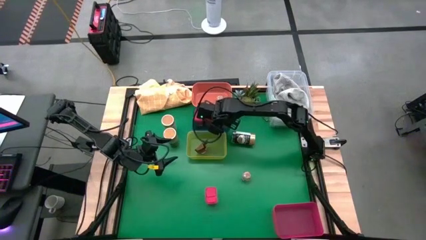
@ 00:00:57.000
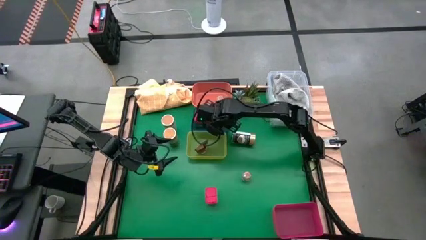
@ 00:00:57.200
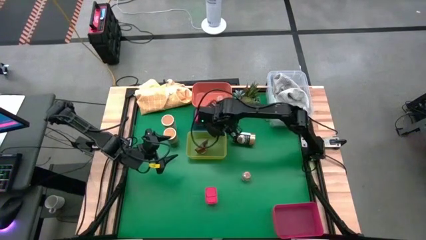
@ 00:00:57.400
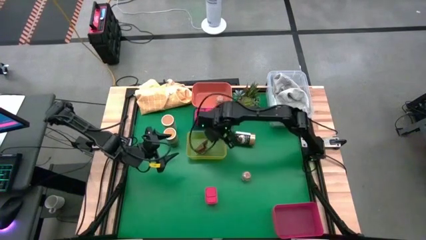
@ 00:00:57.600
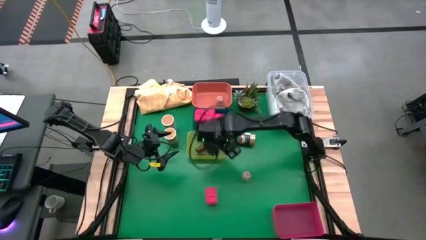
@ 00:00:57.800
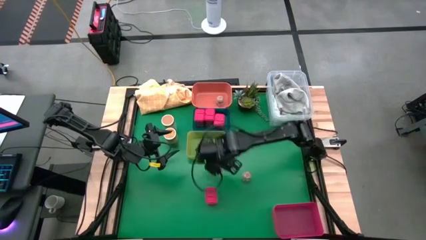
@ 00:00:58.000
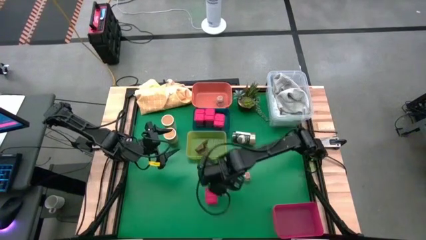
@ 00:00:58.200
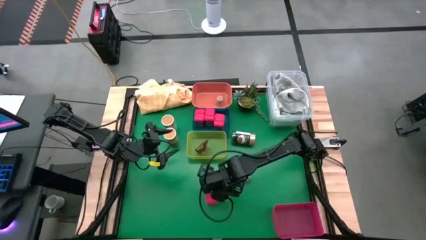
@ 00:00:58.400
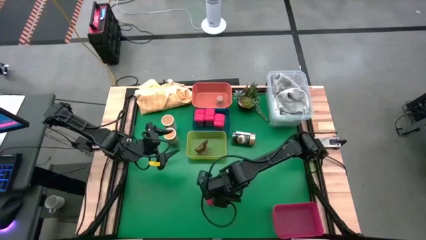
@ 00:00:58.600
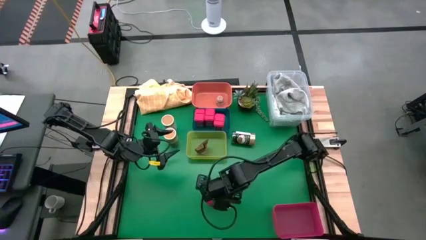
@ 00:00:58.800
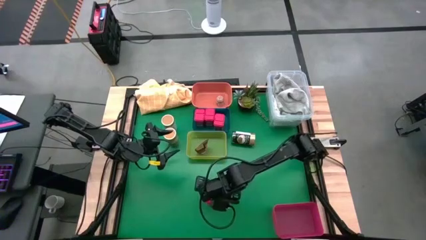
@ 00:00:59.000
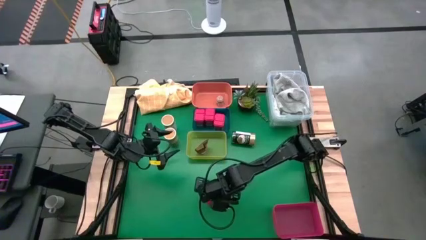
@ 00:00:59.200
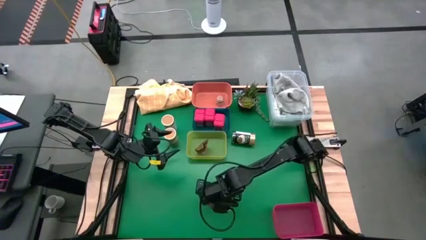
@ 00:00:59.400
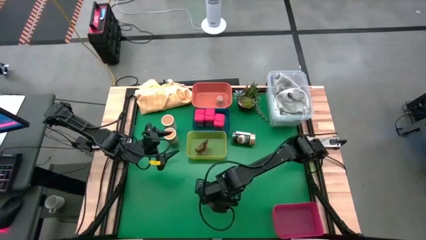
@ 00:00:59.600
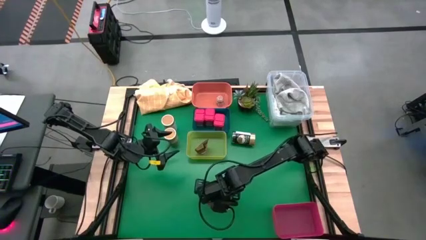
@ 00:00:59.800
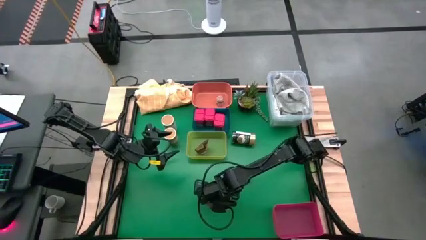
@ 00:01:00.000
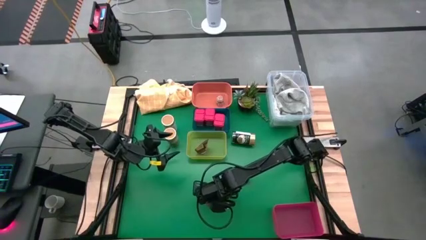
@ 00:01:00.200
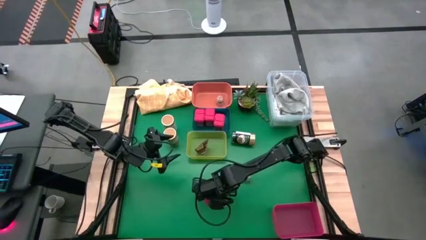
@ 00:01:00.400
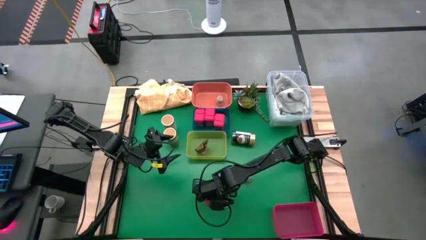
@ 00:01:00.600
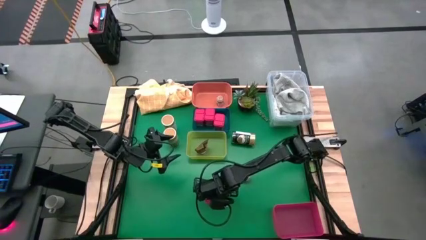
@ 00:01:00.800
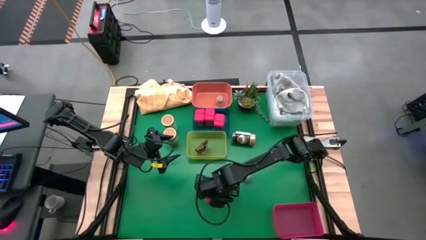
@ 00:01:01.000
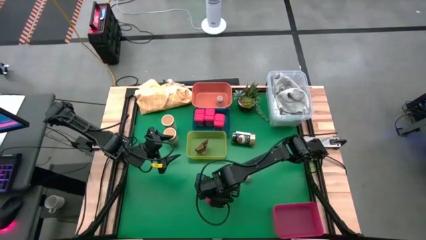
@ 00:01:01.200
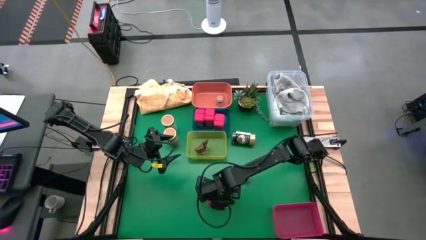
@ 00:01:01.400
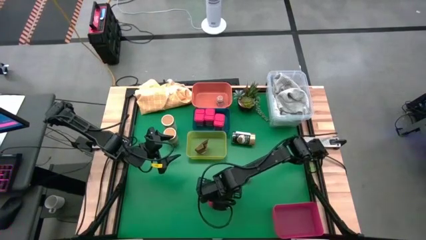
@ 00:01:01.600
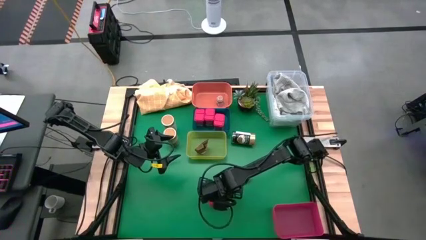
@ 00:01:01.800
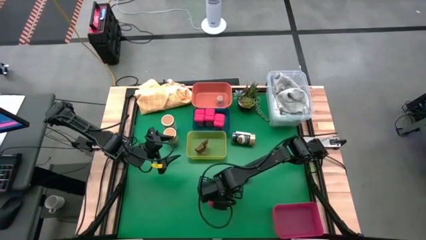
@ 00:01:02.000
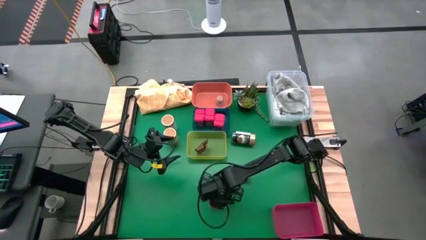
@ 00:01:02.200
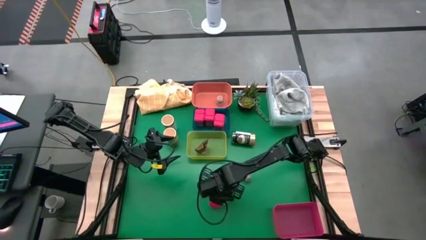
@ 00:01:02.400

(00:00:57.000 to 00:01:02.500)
Task: Sort spices by type
Put the red seasoning can into the blue bin

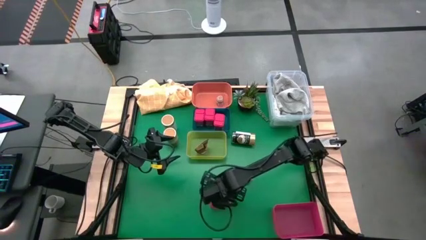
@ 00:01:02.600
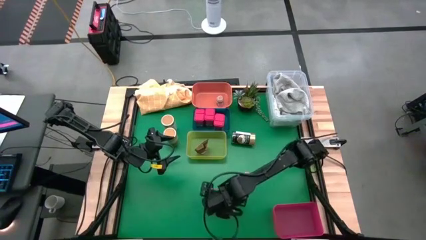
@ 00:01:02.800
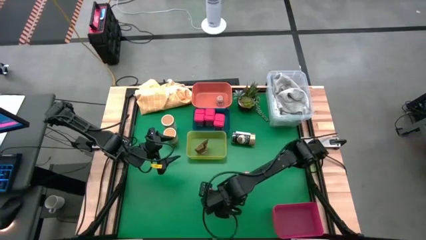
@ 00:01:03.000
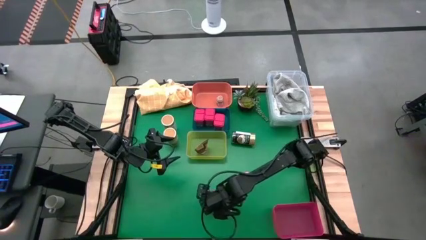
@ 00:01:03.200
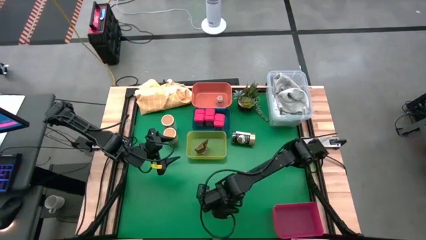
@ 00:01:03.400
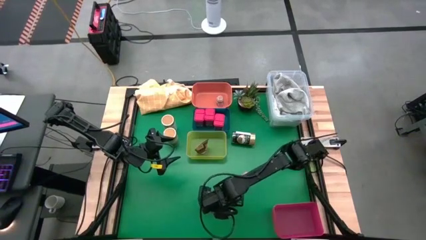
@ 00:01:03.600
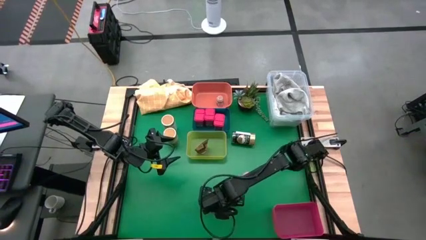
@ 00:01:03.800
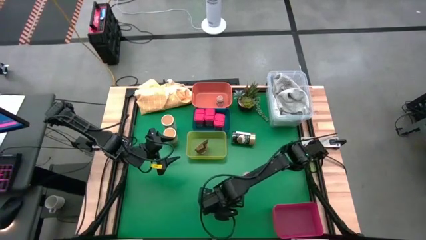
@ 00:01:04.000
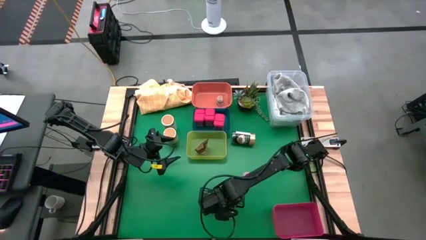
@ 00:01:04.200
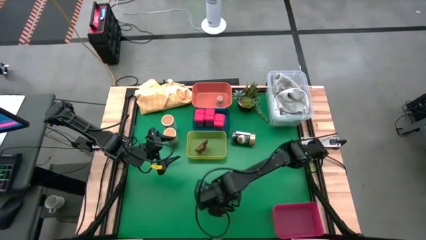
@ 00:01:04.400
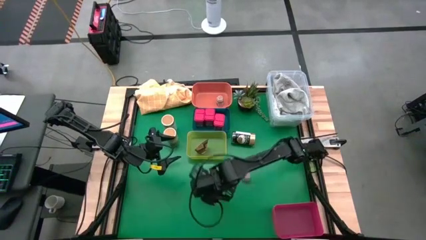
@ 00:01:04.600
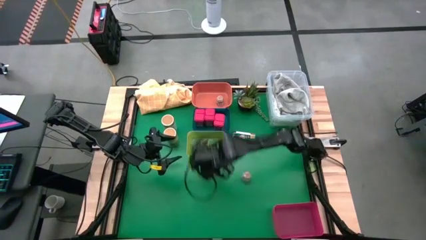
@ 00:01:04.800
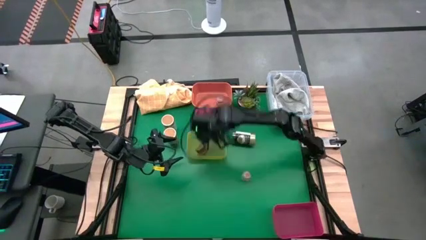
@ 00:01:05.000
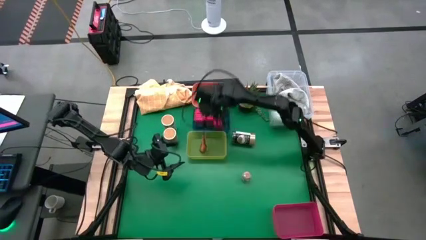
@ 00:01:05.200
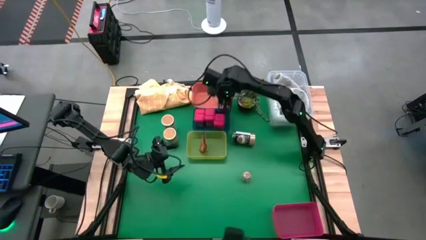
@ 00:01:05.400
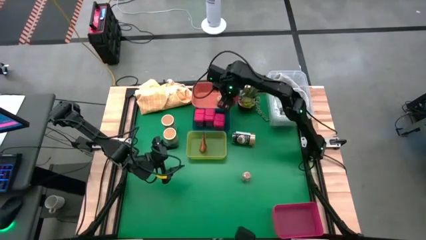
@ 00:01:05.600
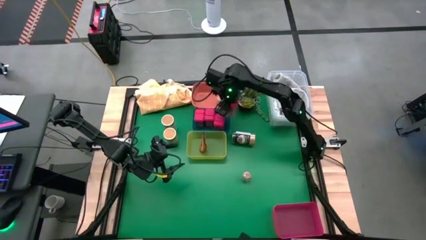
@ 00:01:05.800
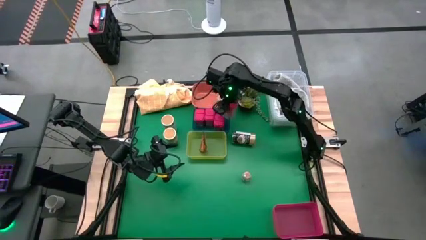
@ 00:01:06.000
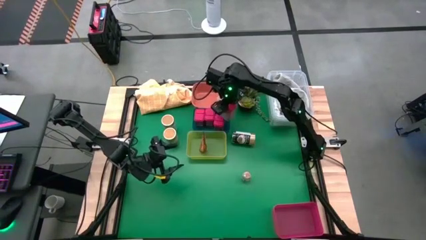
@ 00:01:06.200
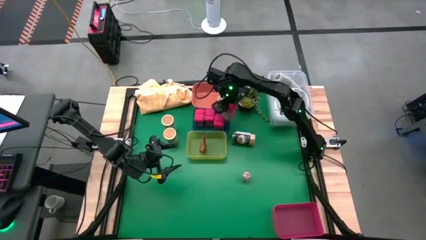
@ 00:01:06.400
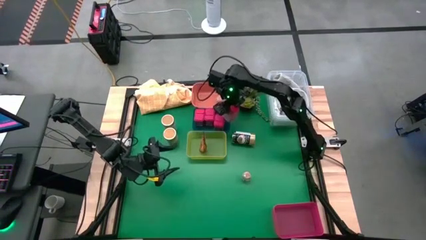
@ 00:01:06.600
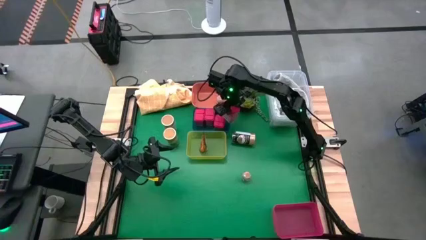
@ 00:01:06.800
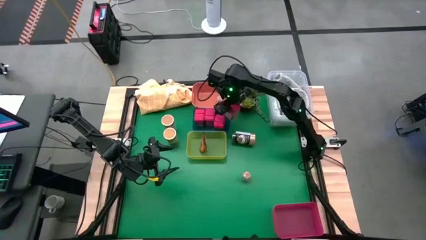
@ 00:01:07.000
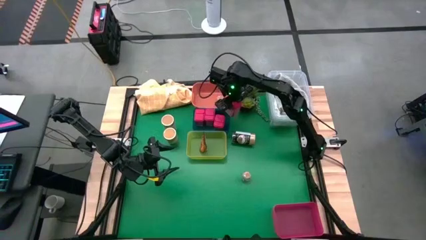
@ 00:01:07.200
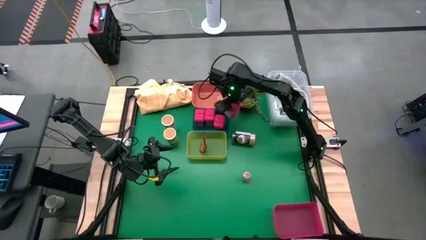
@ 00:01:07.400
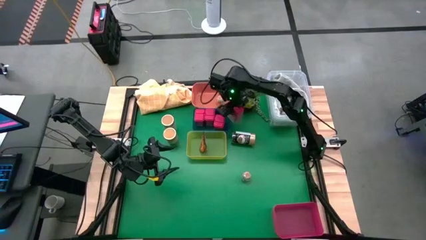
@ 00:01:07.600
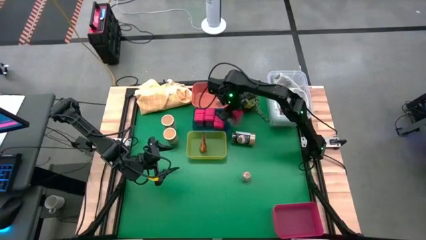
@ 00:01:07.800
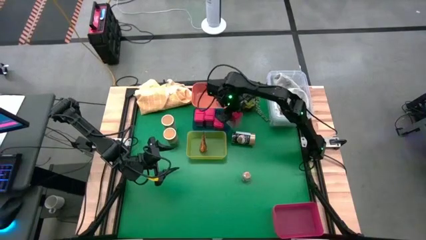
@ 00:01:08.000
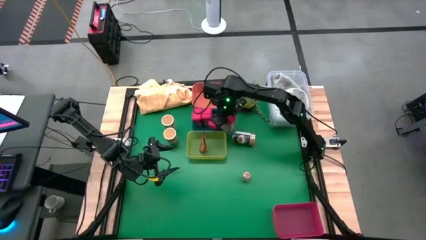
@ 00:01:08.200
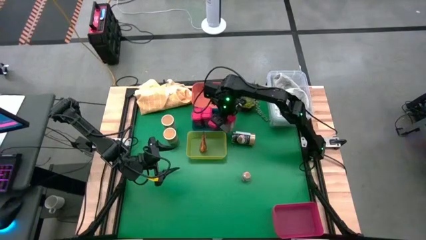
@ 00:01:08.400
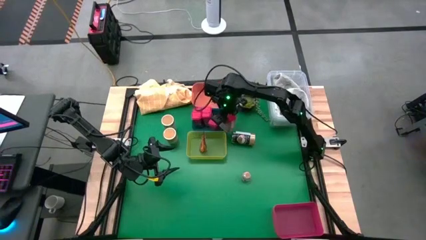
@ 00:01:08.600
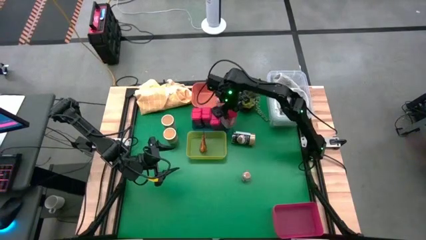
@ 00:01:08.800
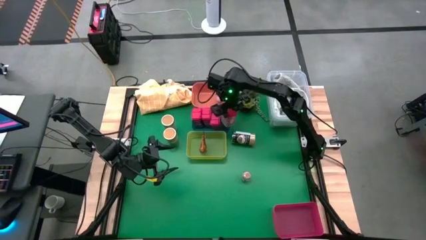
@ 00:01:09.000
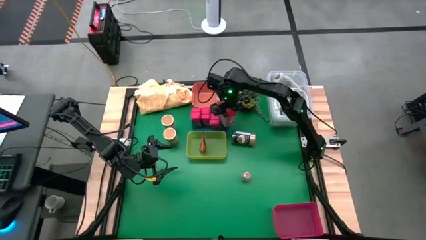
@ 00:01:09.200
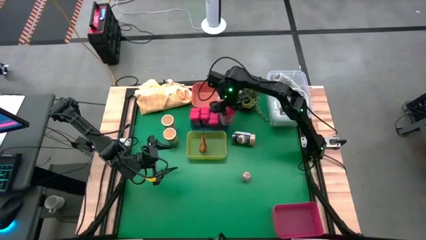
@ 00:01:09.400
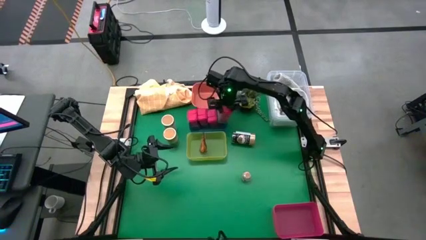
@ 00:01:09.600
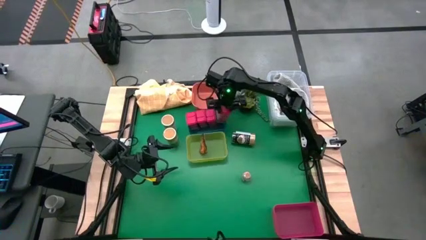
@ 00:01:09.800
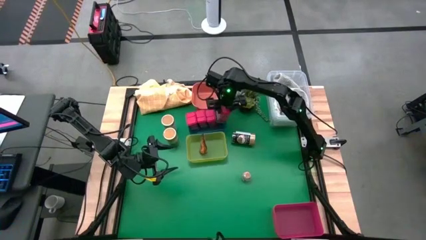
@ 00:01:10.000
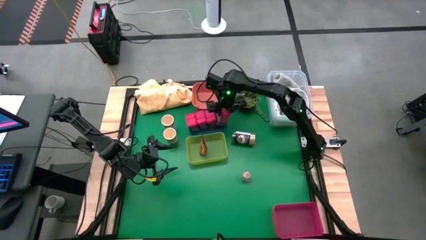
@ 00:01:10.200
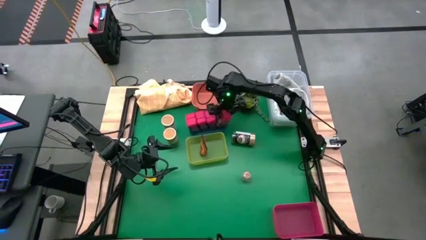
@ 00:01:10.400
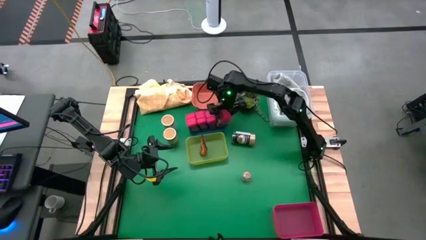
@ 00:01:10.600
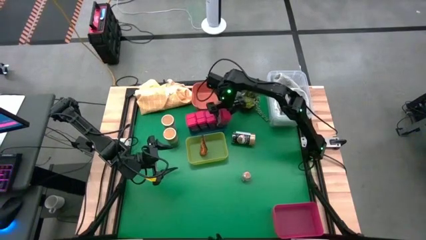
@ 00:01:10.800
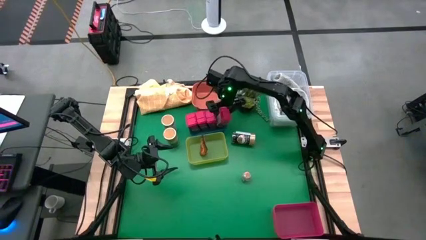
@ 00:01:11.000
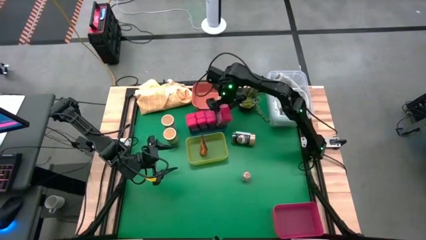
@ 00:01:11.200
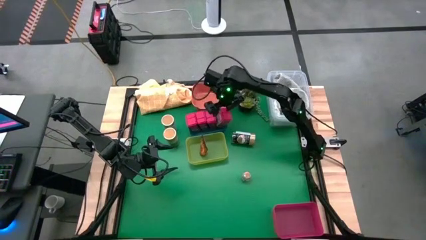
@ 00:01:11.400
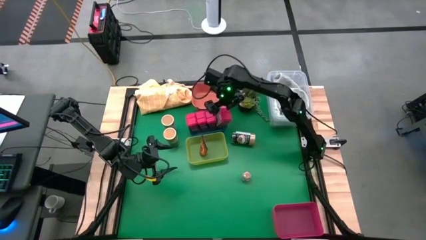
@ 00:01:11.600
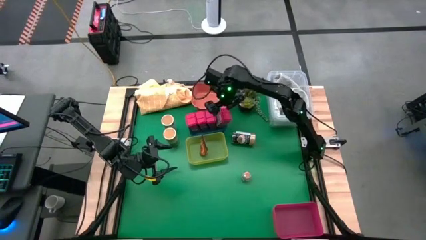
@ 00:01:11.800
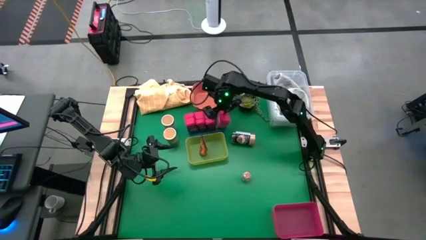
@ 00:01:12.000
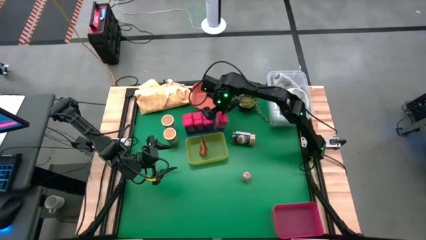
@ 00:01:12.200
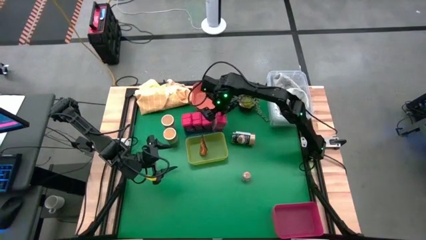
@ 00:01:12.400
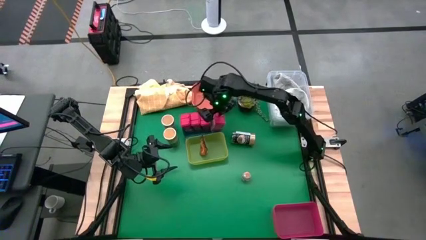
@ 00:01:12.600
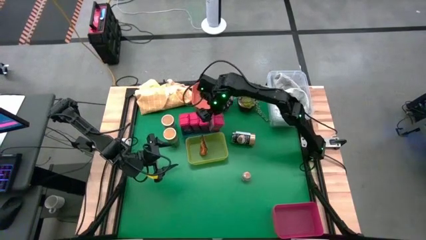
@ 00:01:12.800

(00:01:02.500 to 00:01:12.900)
Put the red seasoning can into the blue bin
